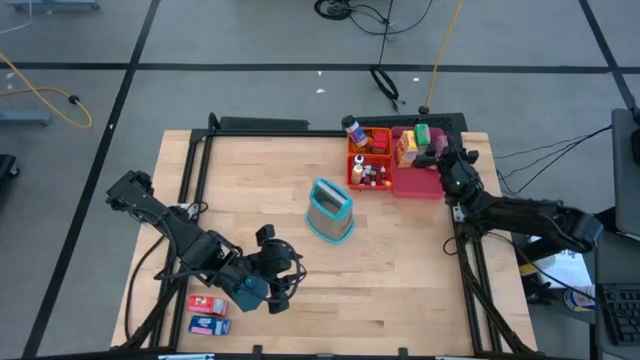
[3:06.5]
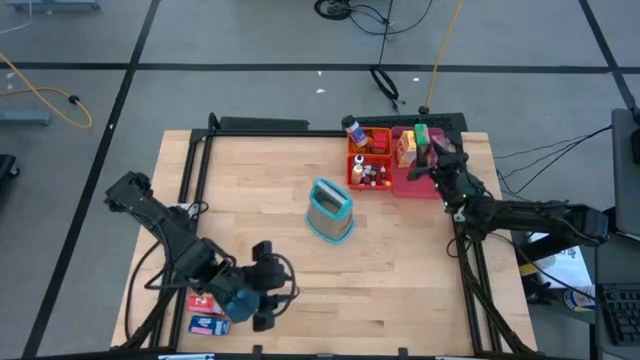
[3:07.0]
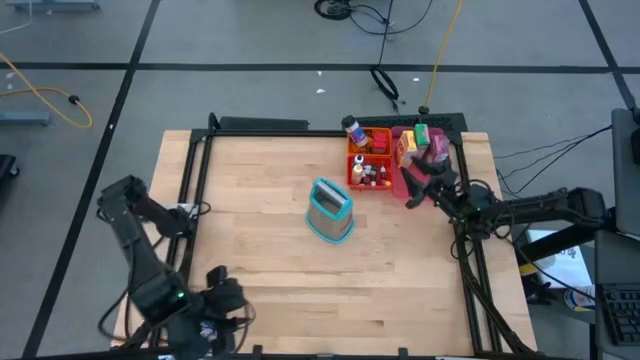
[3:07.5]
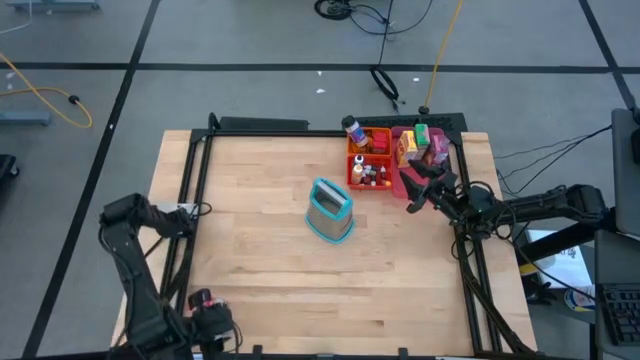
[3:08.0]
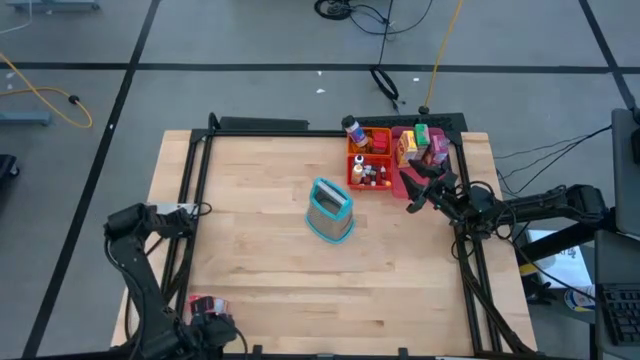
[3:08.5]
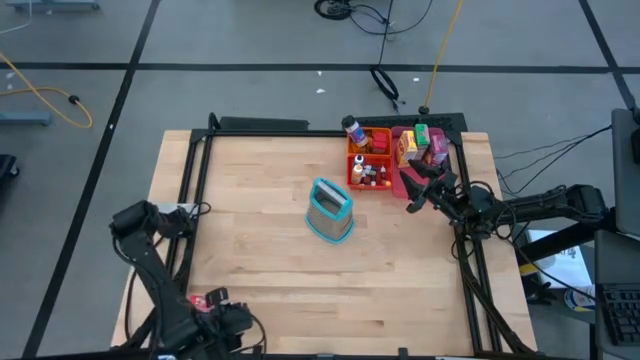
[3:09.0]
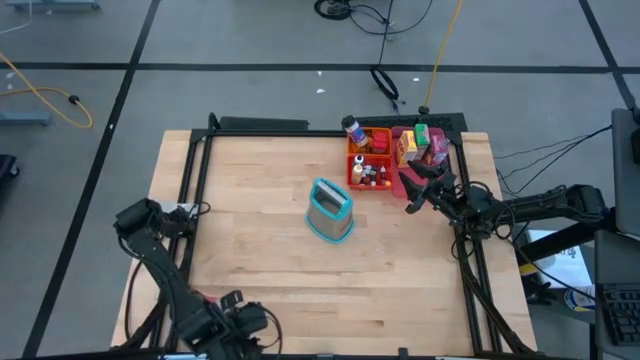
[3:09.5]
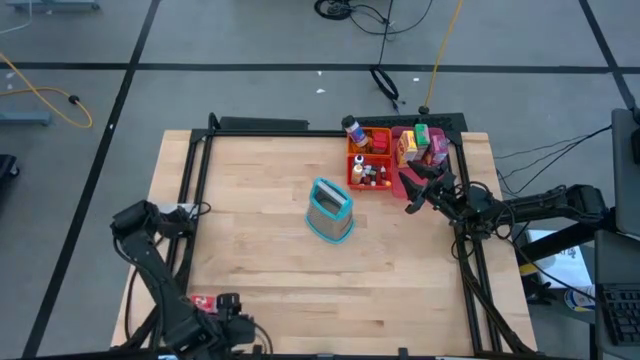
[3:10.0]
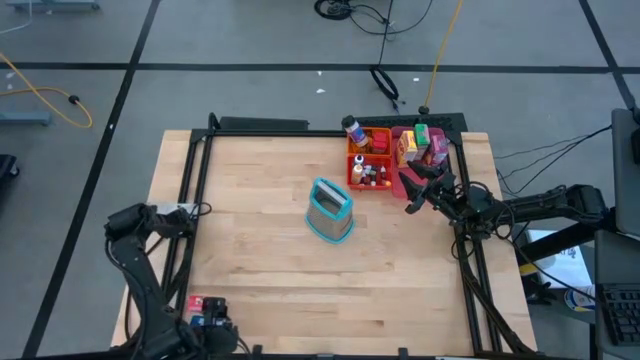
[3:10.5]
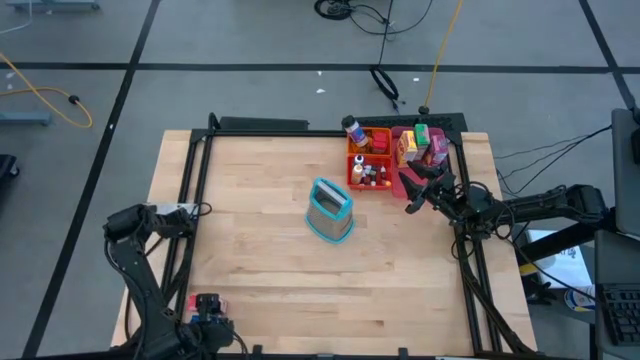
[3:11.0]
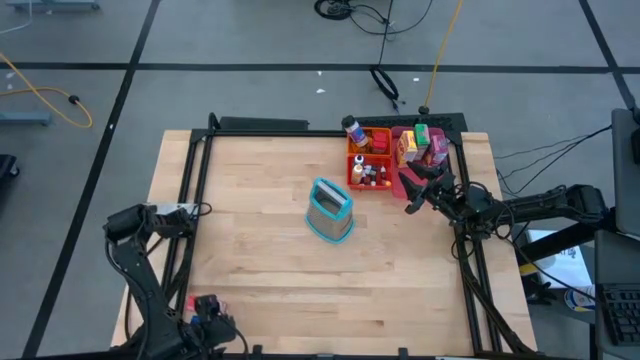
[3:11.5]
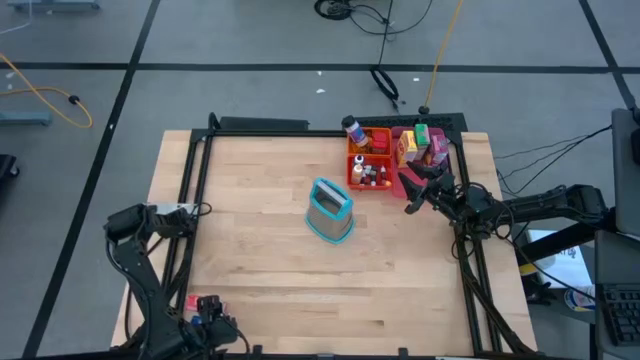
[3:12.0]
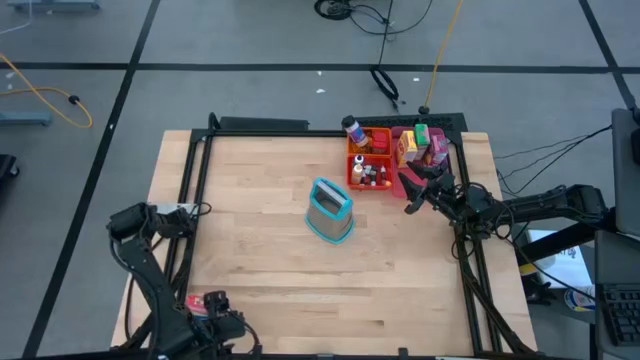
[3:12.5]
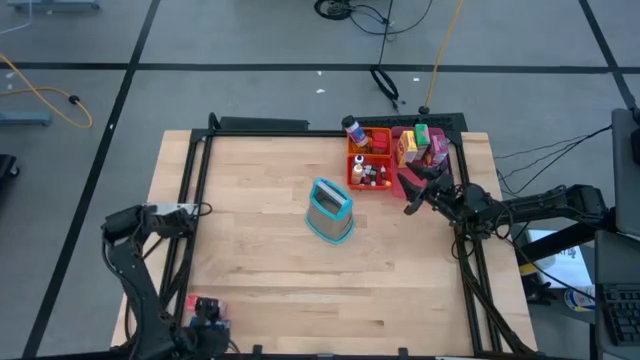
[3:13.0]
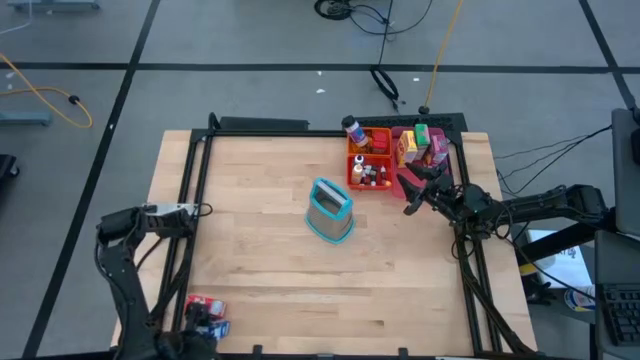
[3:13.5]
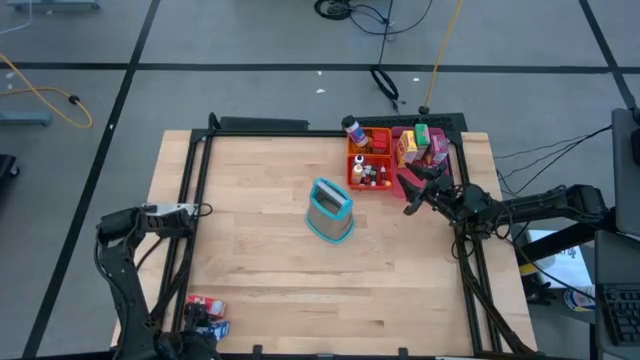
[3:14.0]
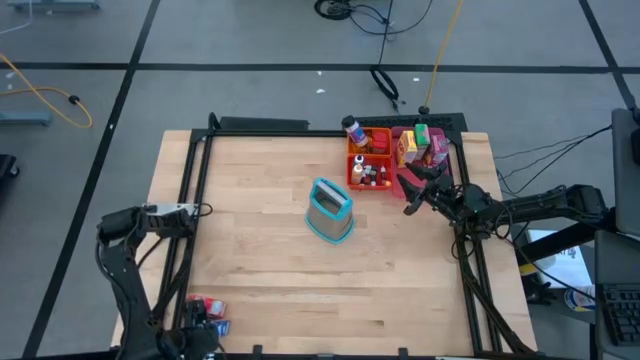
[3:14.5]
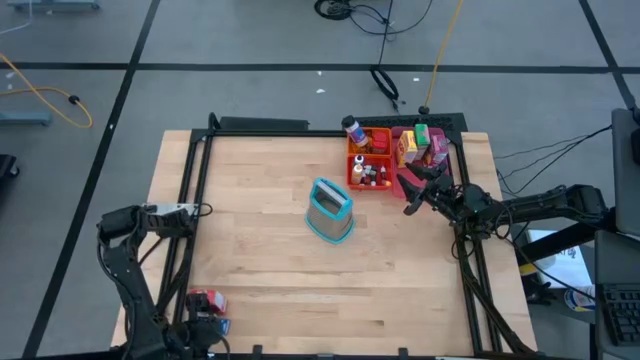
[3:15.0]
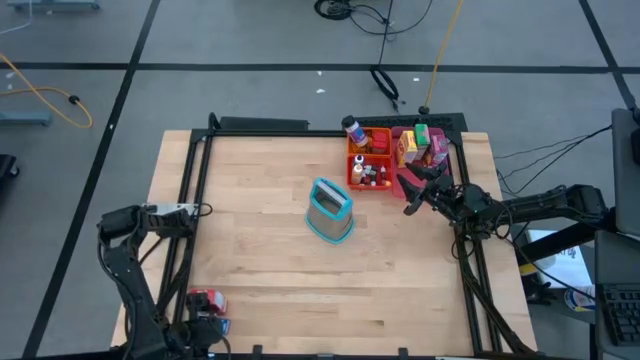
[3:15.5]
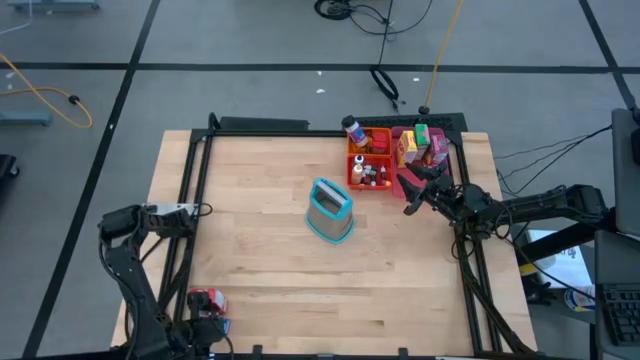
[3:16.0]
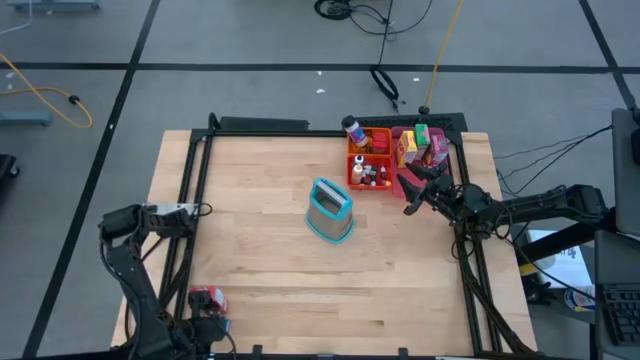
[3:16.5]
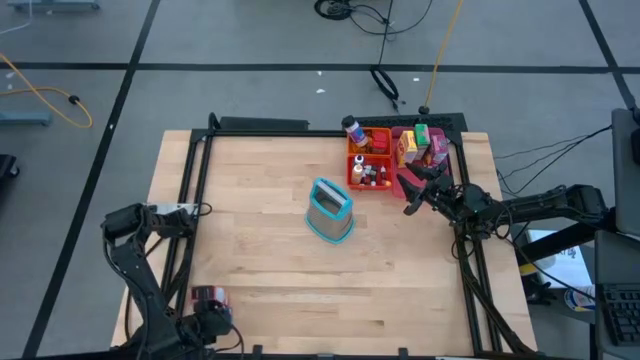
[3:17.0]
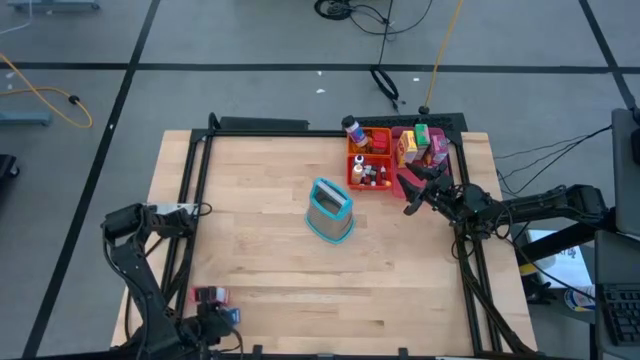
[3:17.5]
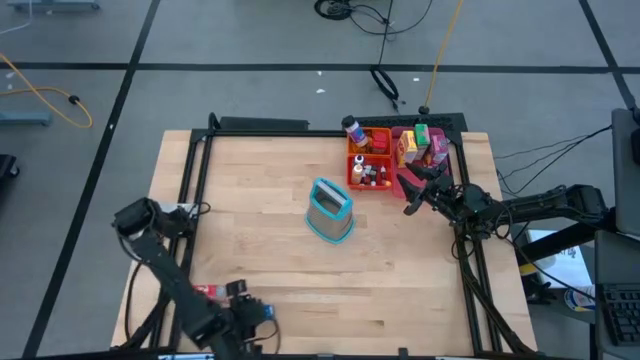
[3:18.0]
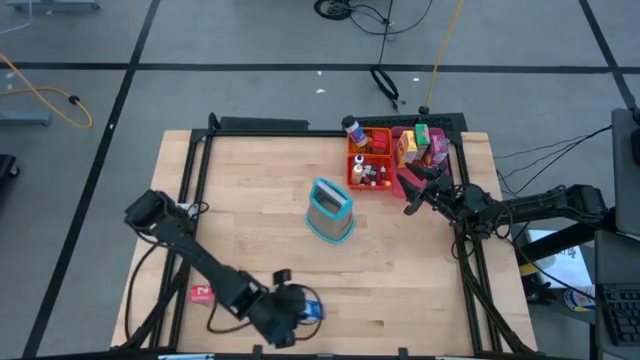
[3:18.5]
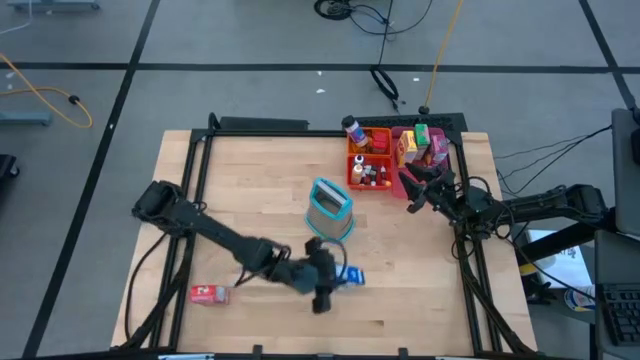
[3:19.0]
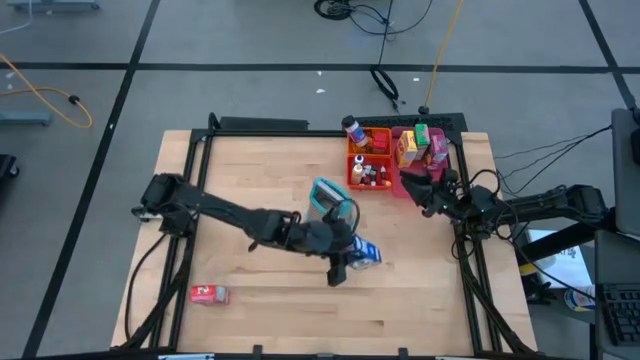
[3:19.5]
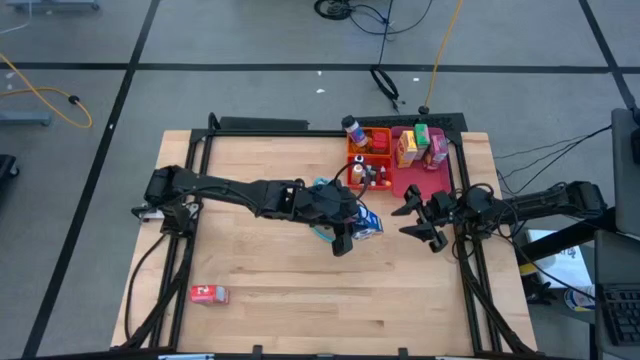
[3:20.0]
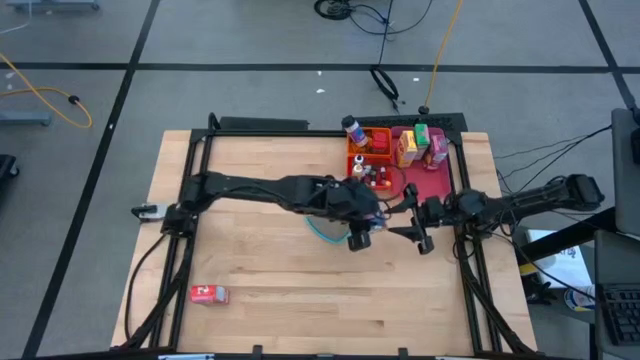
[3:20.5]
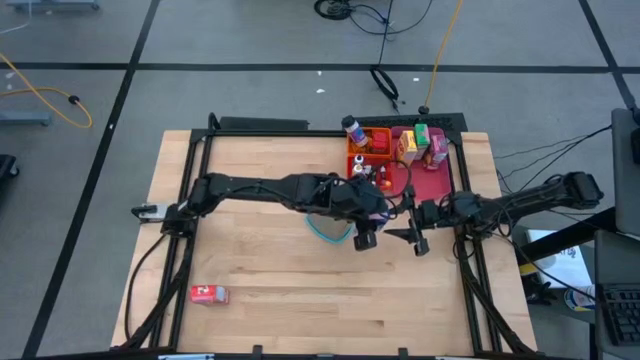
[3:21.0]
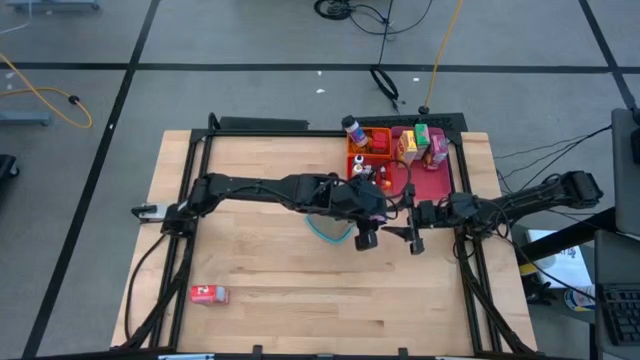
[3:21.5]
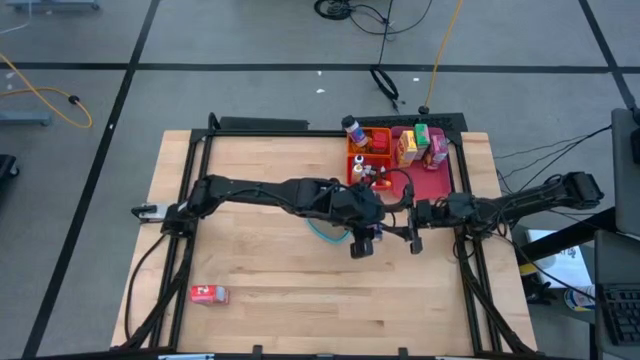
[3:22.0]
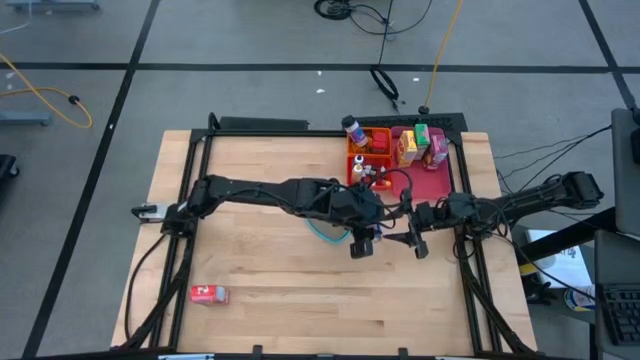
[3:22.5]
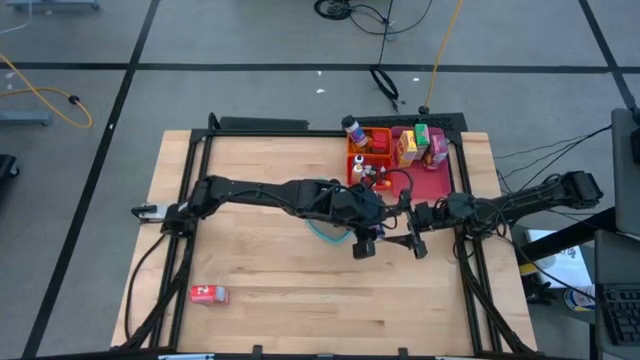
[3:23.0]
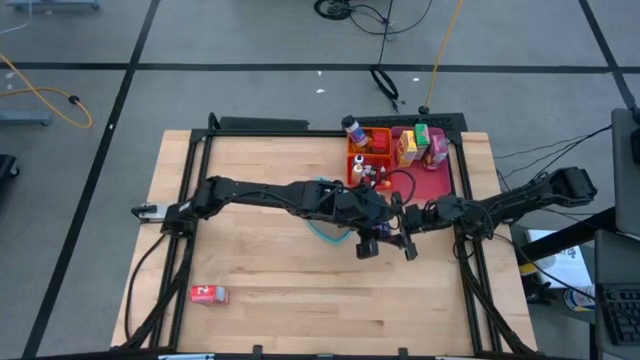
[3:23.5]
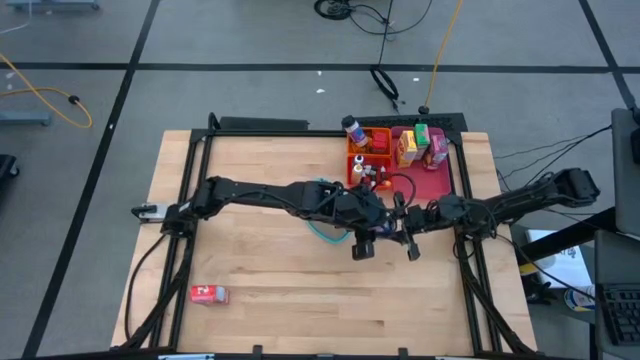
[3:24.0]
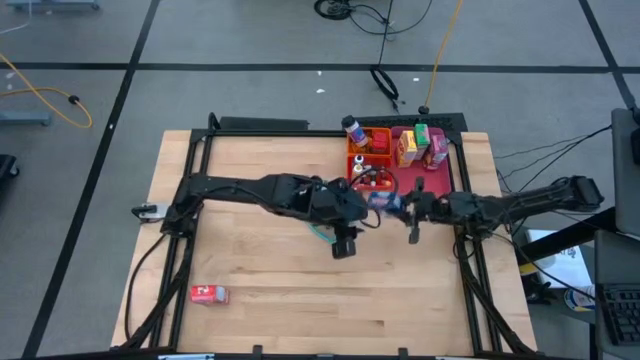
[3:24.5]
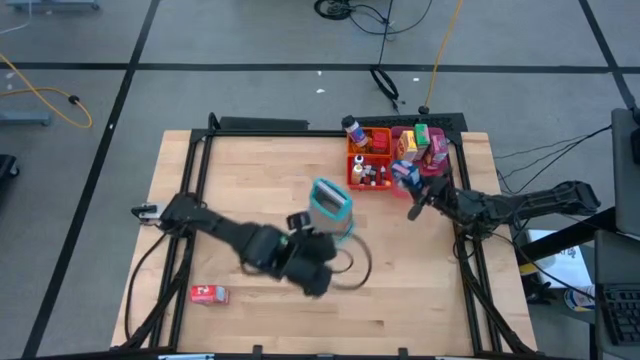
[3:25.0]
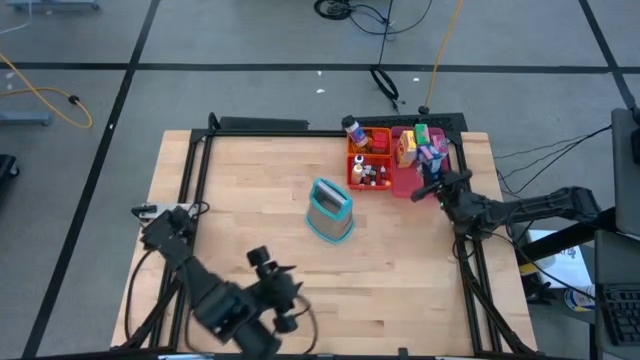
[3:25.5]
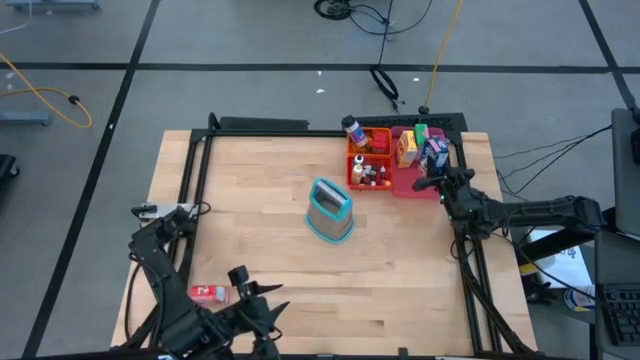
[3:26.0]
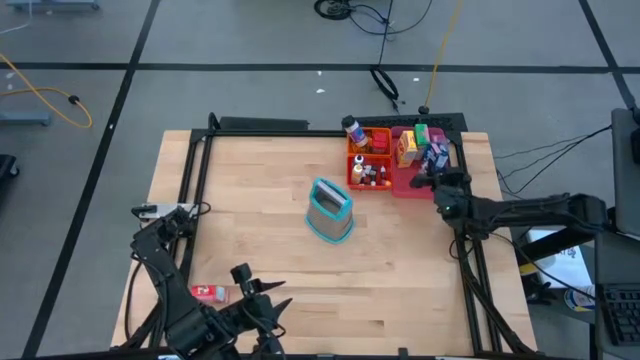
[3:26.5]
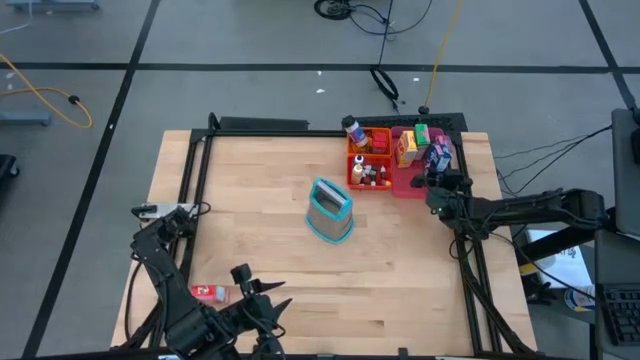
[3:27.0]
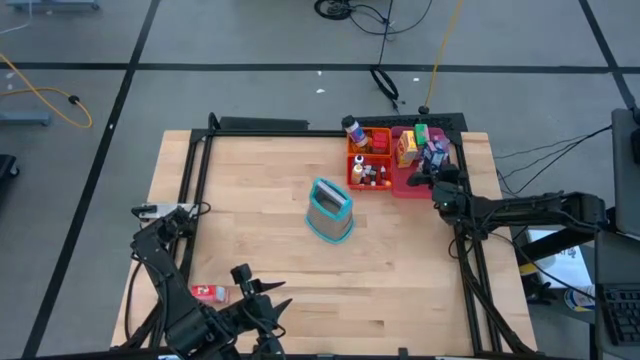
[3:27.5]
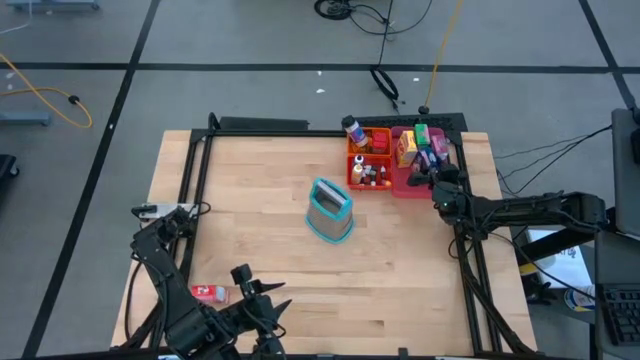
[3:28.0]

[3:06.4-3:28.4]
Task: Pick & Place Kitchen Items
Put the blue cereal box into the red bin
